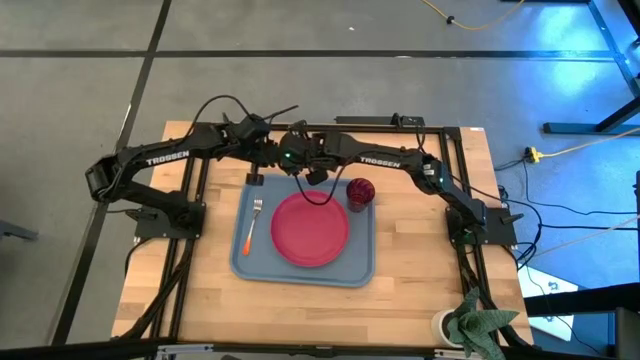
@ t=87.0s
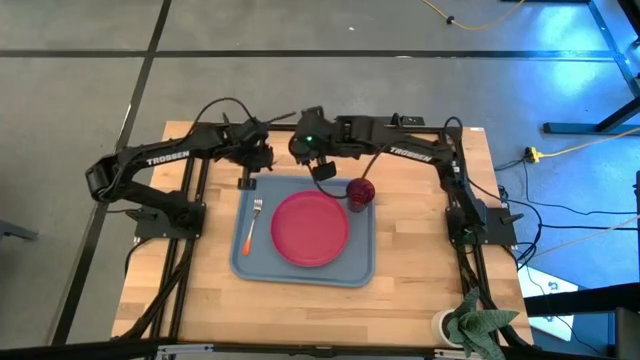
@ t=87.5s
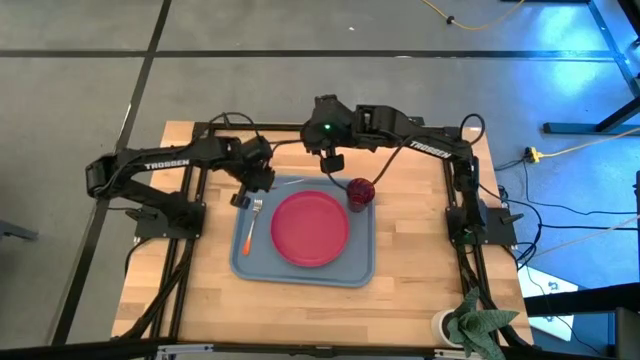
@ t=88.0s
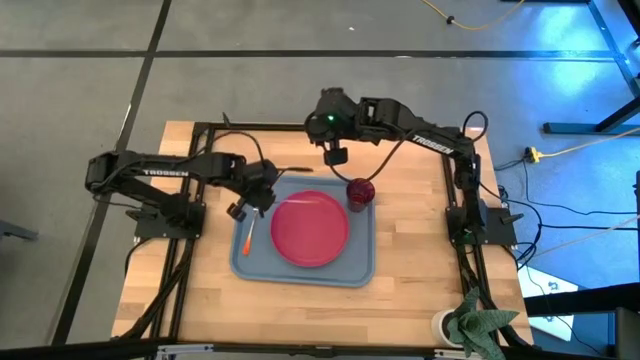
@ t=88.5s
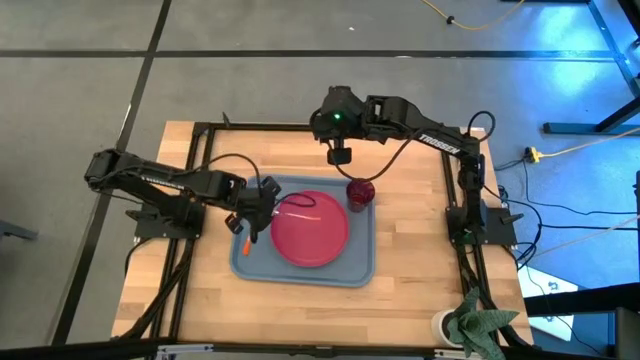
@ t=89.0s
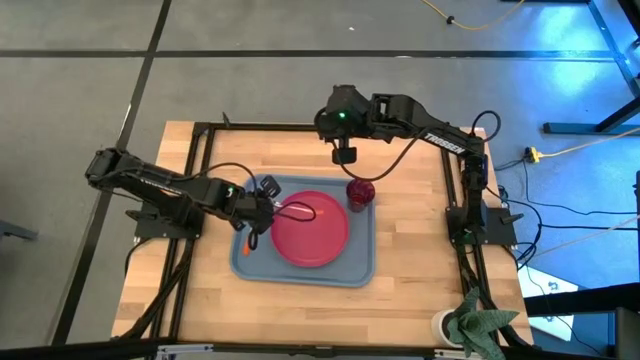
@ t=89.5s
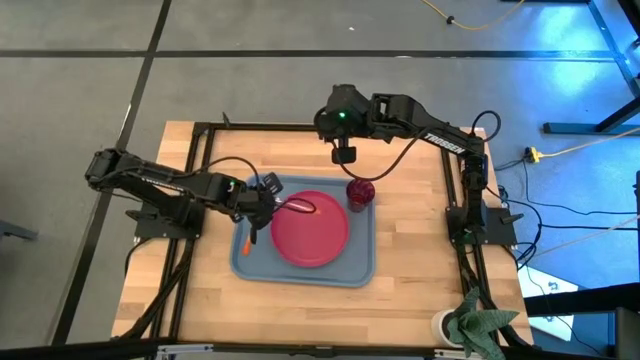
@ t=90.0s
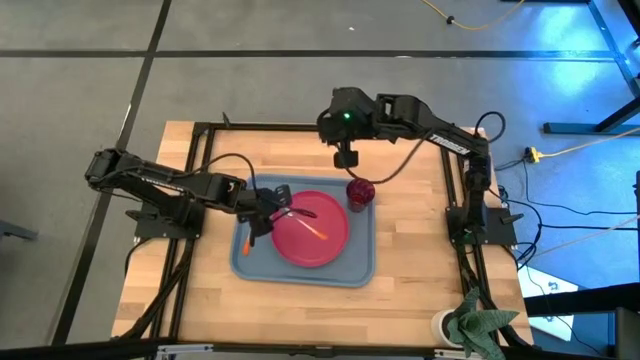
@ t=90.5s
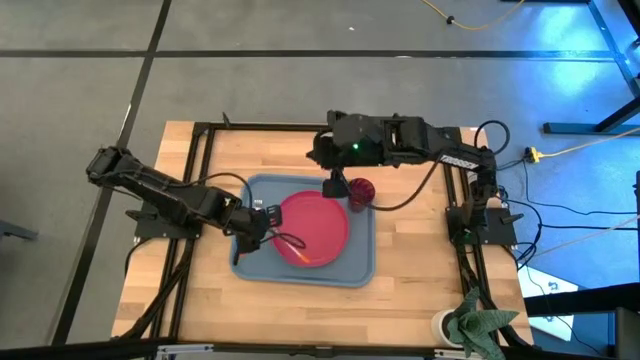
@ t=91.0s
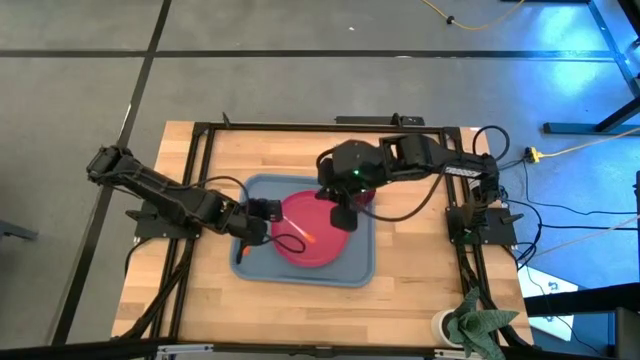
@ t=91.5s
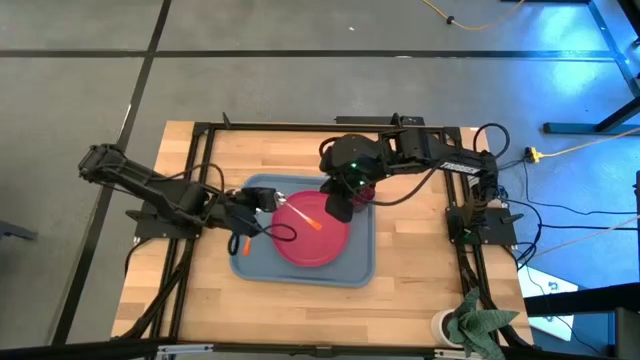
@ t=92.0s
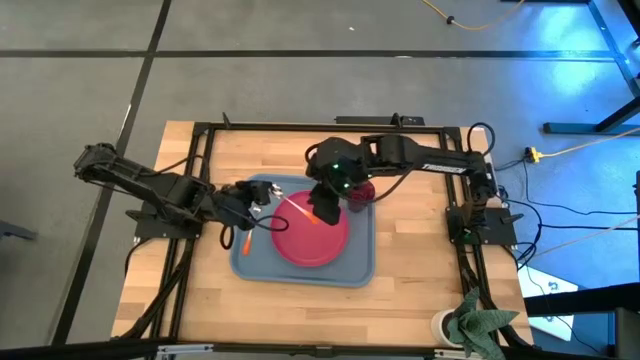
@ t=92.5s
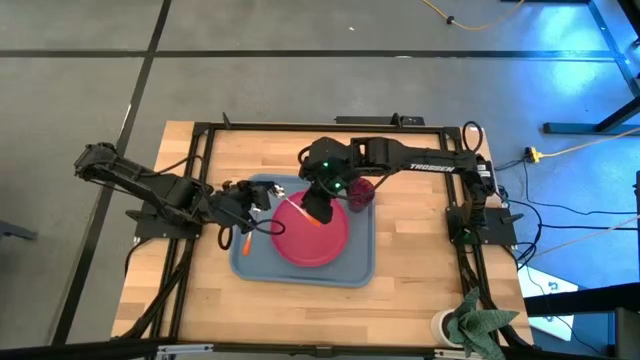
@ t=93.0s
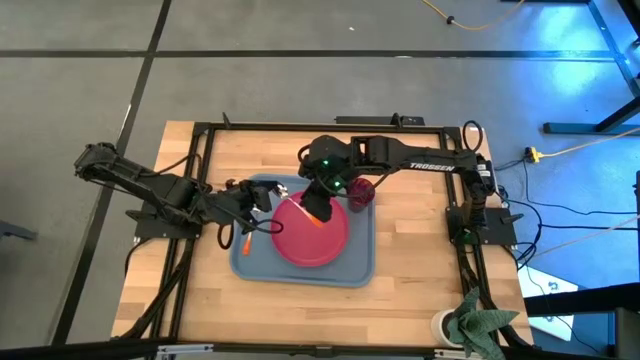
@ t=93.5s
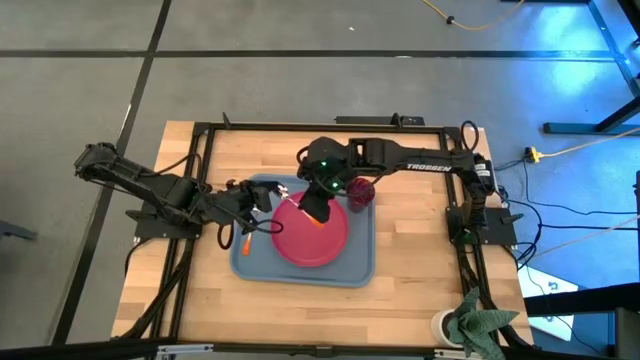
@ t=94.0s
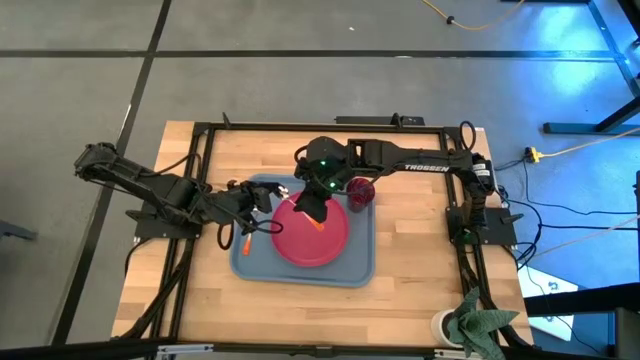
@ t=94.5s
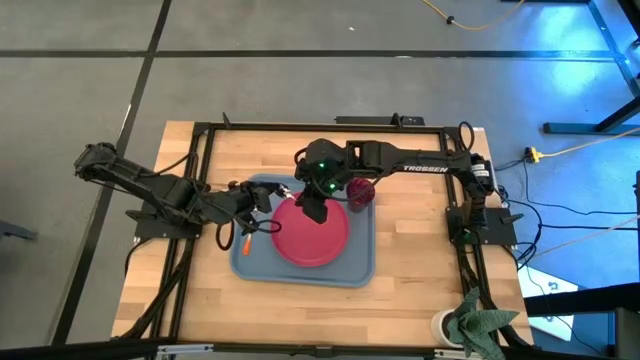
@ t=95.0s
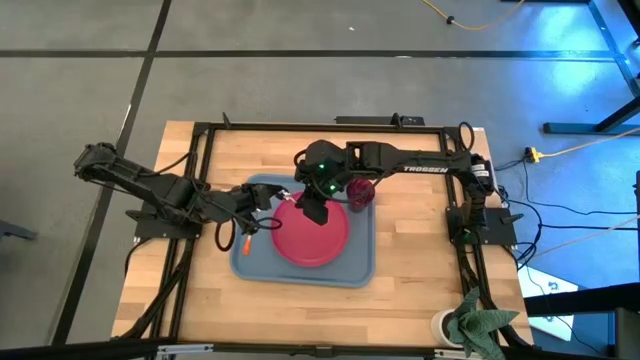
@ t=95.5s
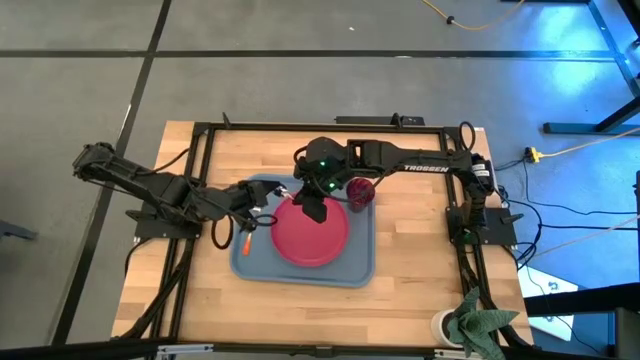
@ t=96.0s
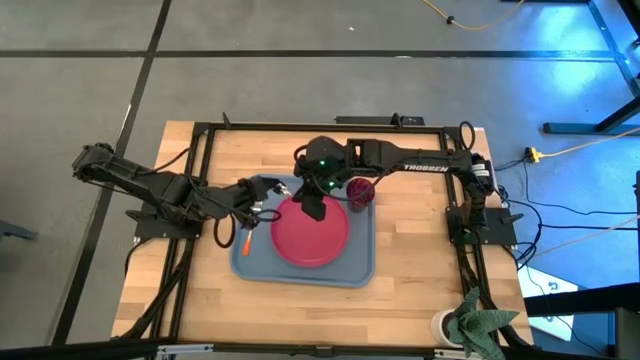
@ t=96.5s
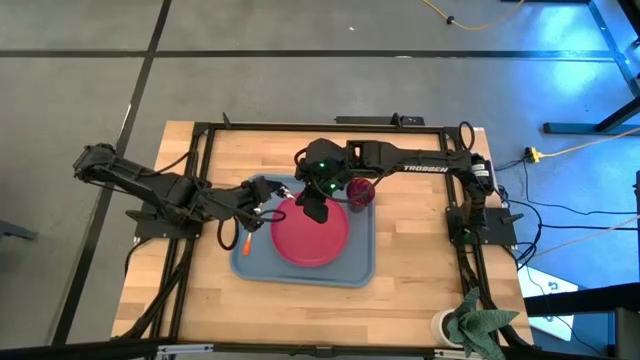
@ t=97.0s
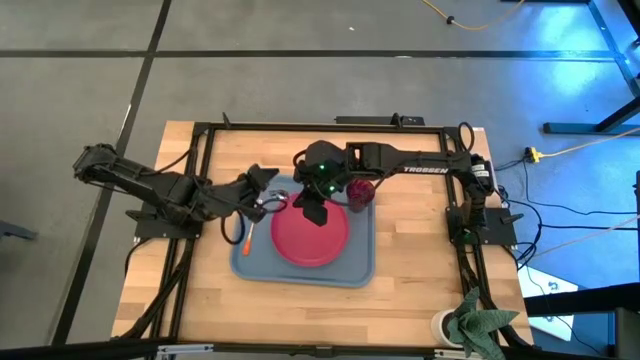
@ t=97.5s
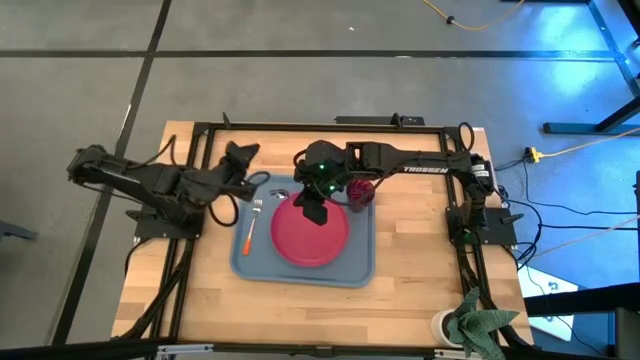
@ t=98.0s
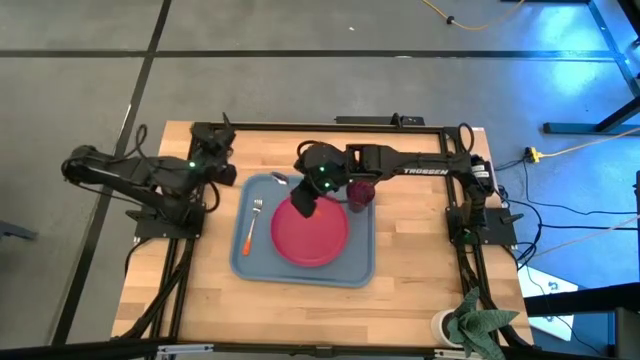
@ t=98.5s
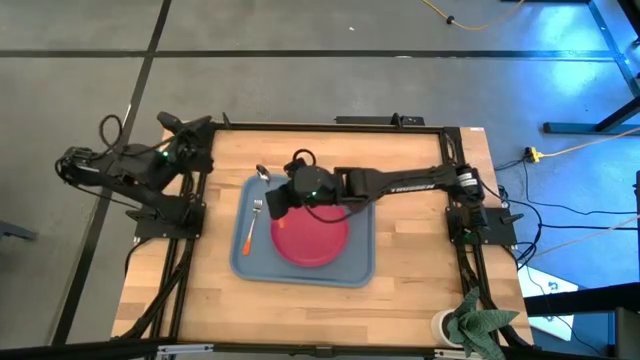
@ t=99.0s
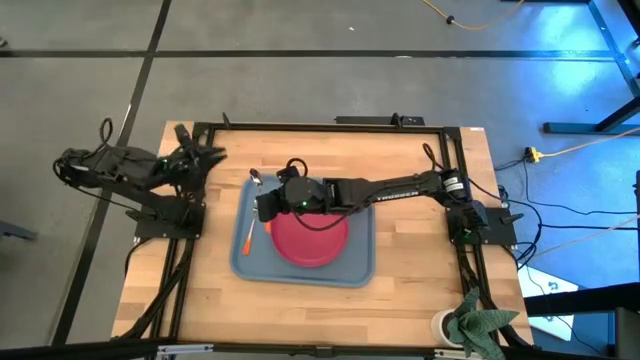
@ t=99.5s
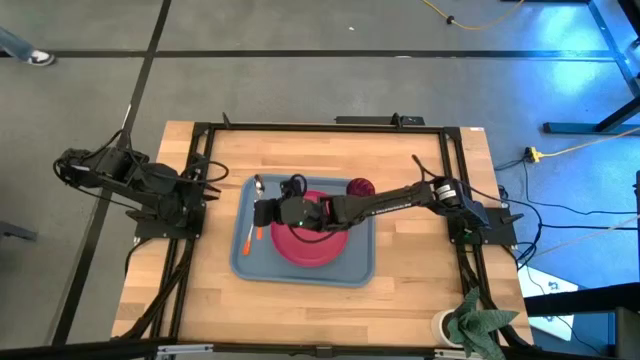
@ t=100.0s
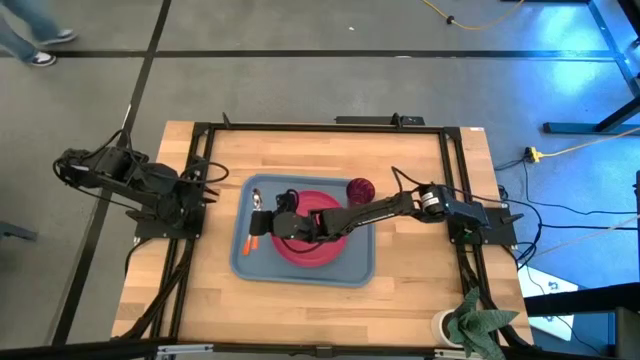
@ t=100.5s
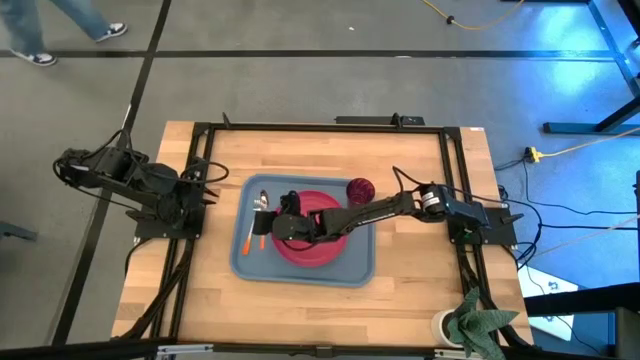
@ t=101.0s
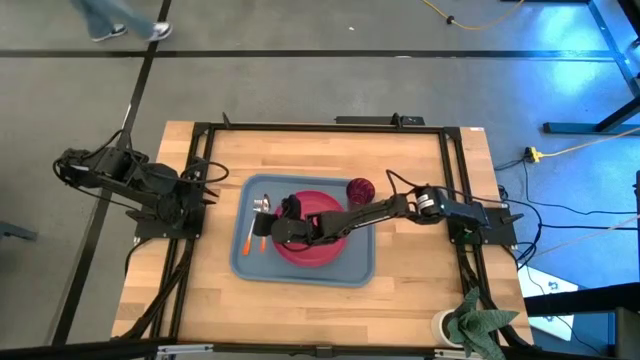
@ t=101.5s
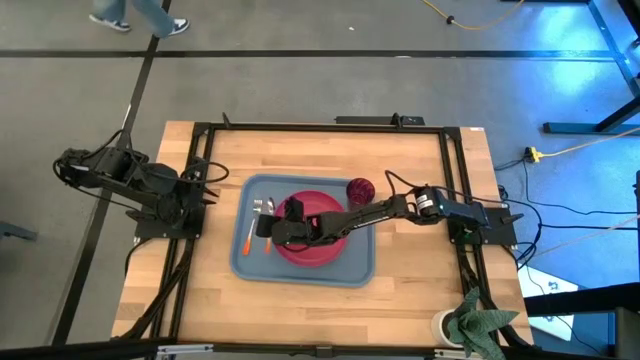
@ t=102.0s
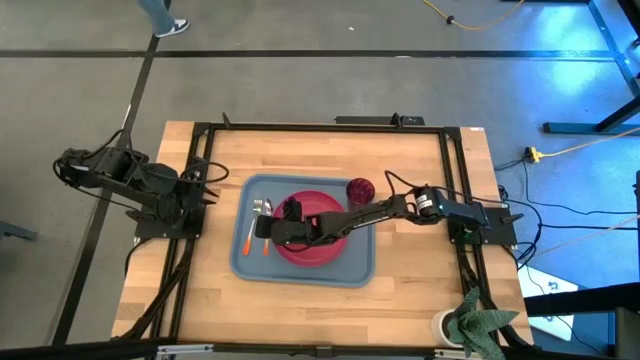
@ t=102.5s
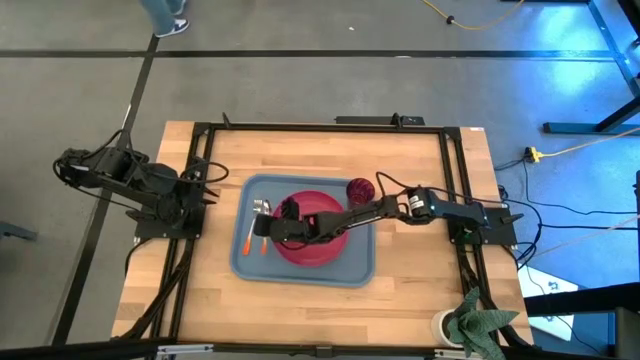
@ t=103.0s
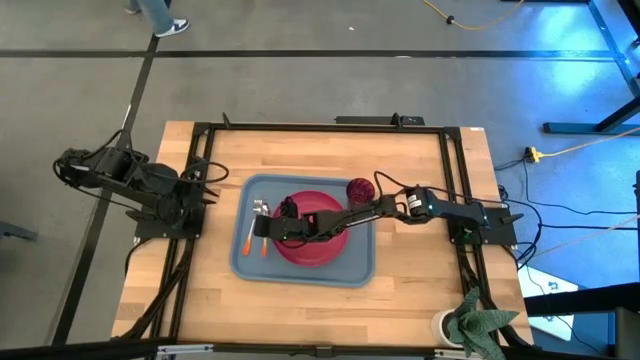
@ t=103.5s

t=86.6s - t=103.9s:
Task: Pick and place plate/cup/fork/spoon on tray
Put the orange spoon on the blue serving tray to the left of the red plate

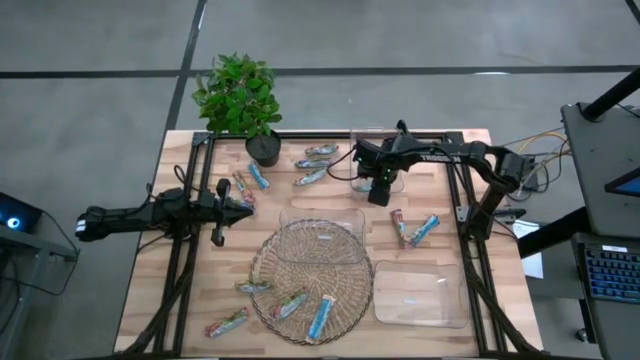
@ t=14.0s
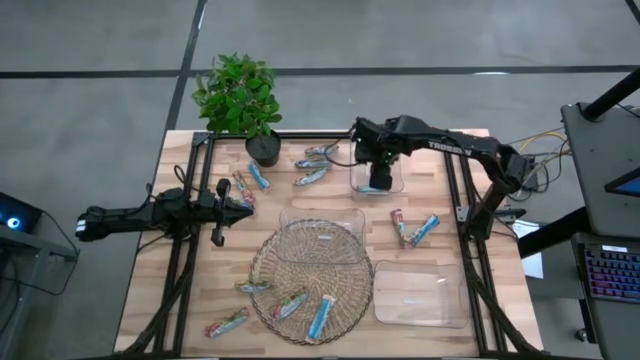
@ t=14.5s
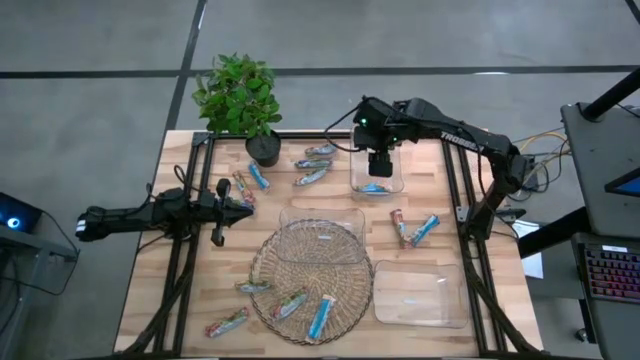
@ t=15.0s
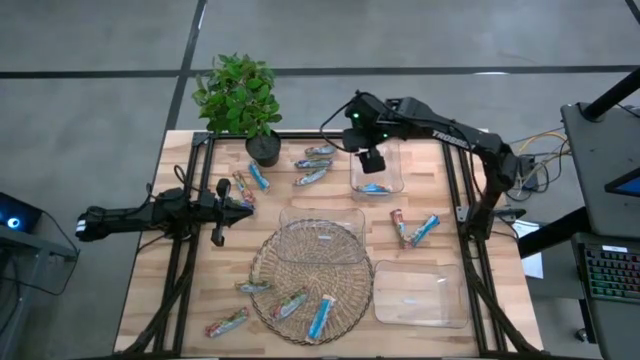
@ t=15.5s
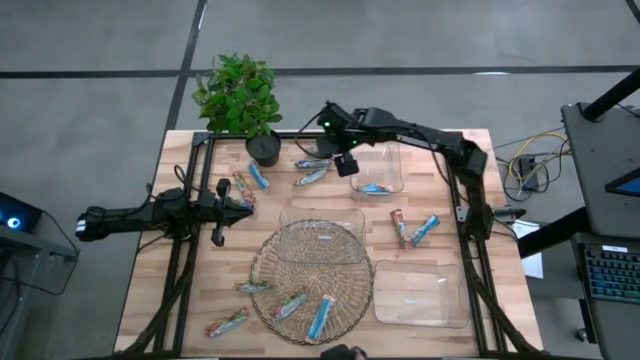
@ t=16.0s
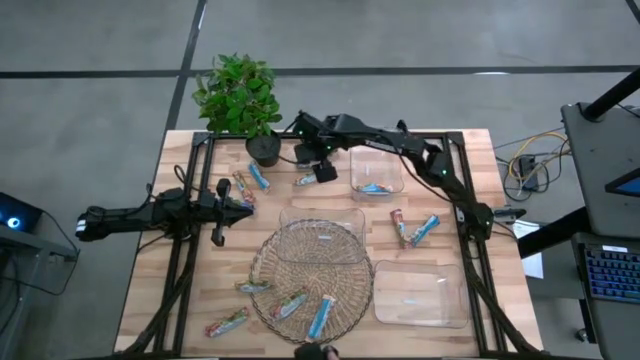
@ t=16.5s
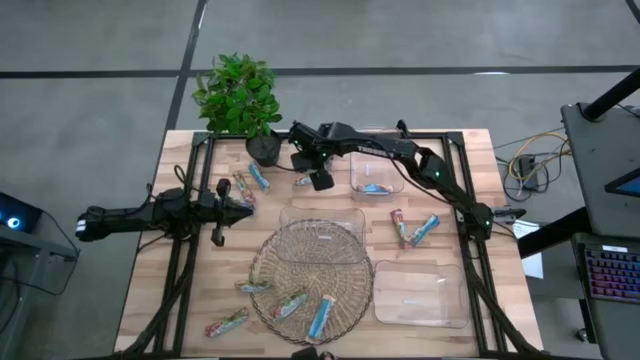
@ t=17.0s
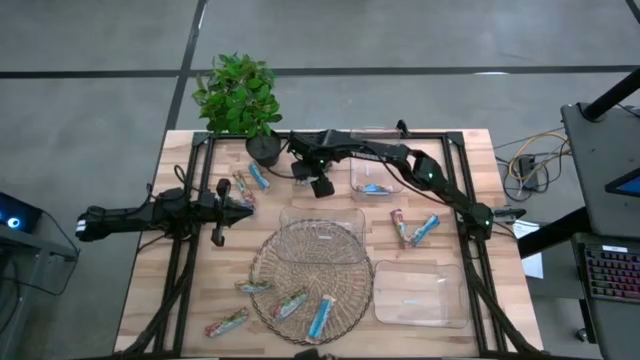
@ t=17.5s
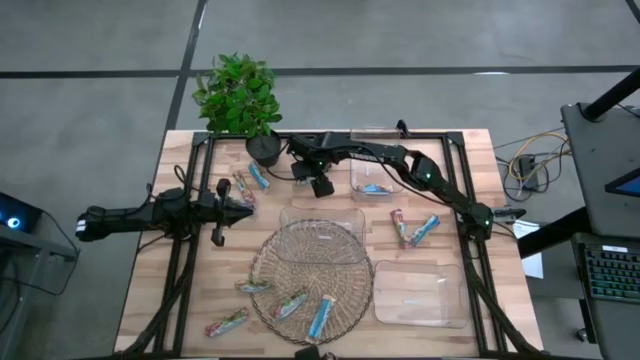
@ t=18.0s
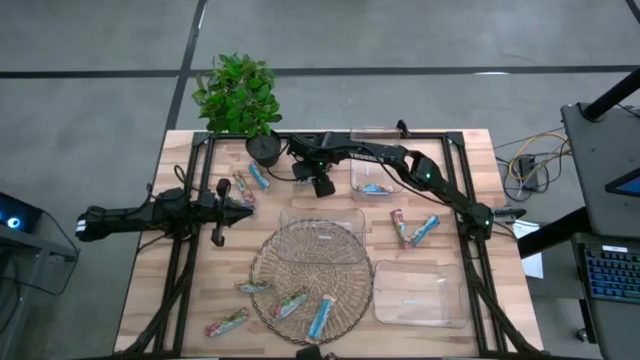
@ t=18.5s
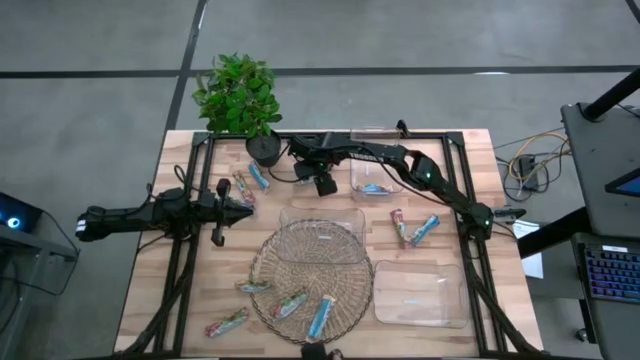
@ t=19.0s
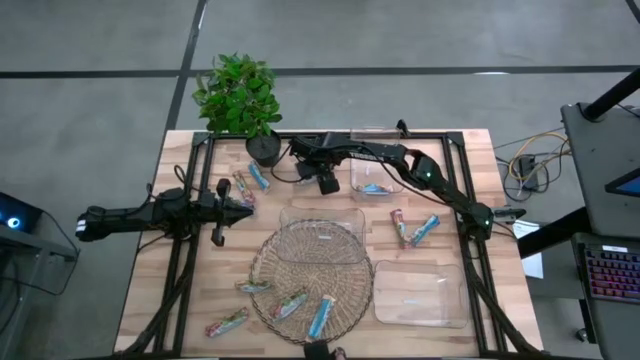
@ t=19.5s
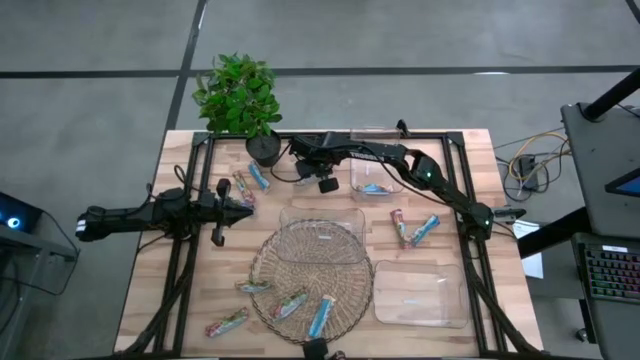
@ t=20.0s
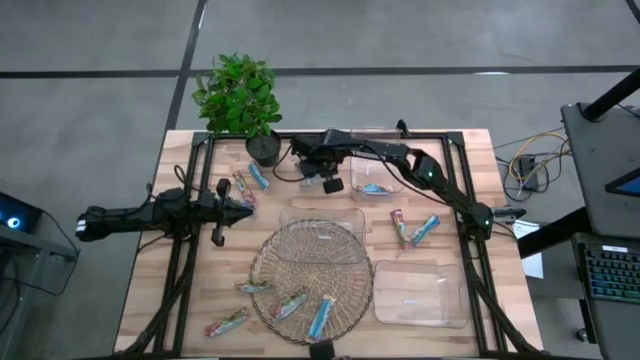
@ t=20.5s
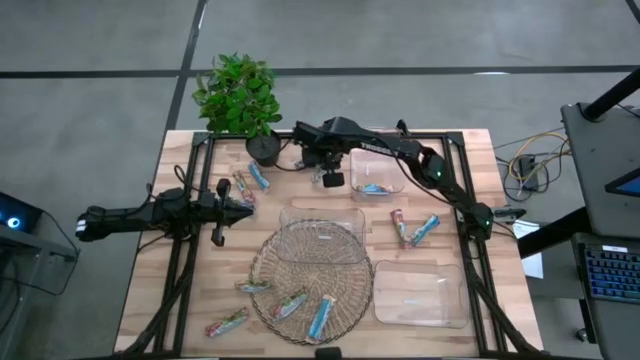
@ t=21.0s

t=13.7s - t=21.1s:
Task: Pick and place Granola Bars by type
Put the yellow granola bar into the top transparent bin
